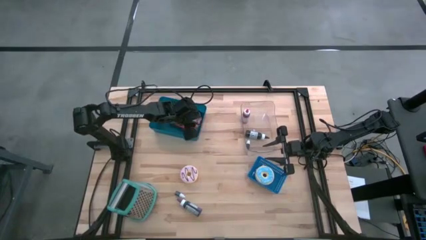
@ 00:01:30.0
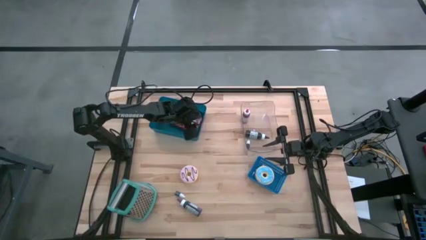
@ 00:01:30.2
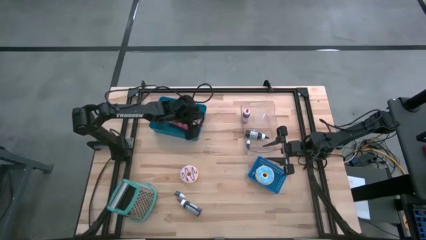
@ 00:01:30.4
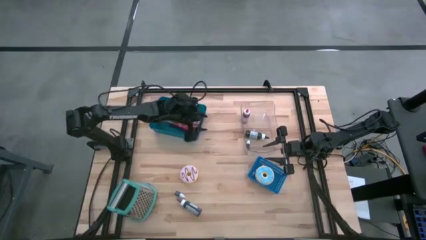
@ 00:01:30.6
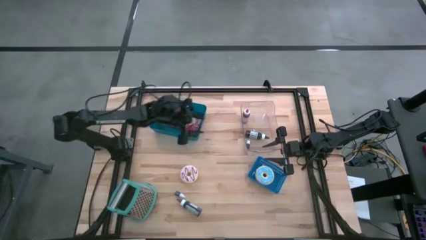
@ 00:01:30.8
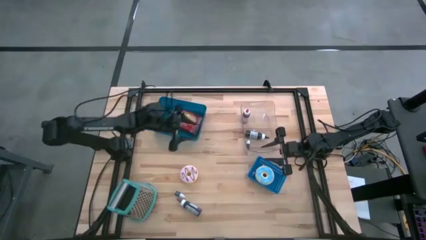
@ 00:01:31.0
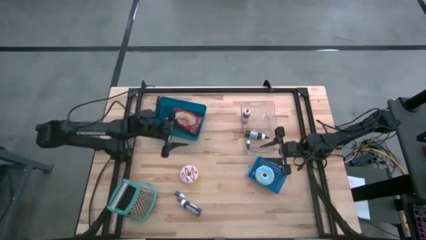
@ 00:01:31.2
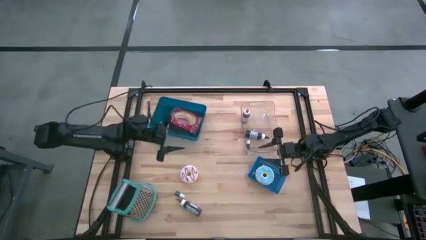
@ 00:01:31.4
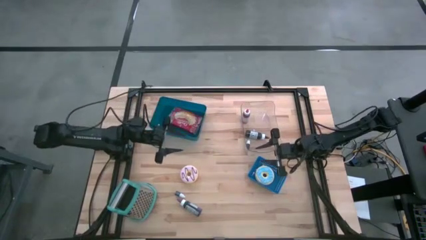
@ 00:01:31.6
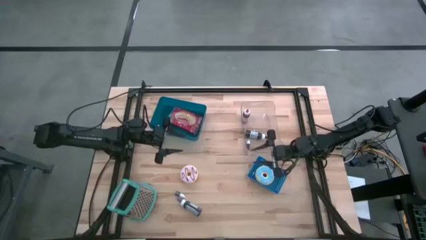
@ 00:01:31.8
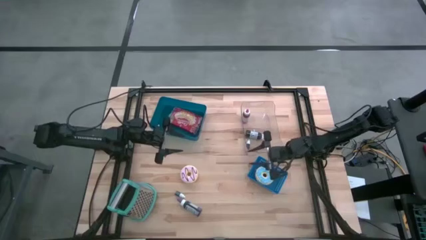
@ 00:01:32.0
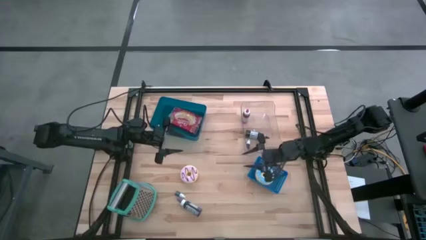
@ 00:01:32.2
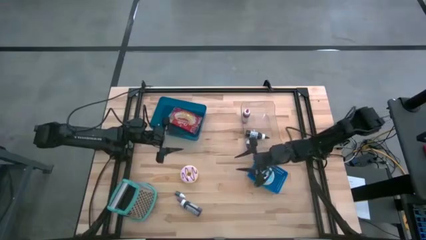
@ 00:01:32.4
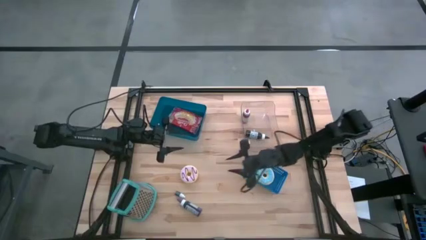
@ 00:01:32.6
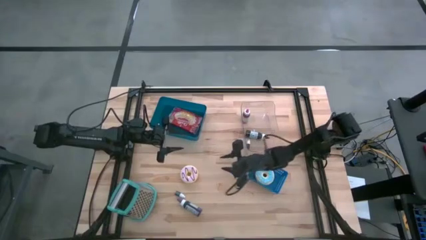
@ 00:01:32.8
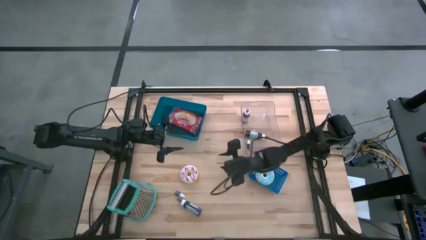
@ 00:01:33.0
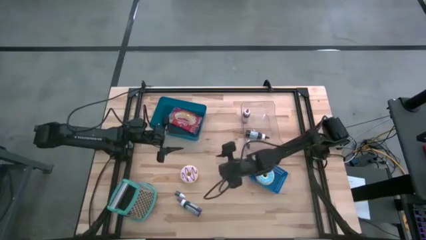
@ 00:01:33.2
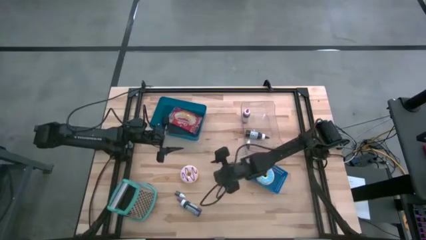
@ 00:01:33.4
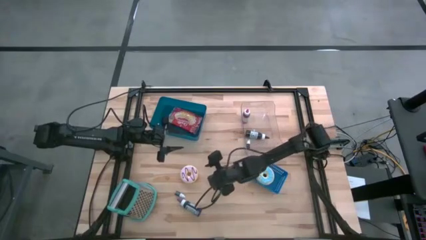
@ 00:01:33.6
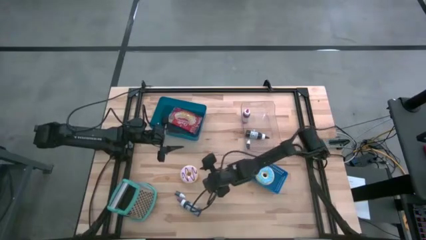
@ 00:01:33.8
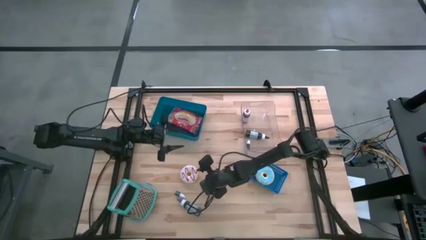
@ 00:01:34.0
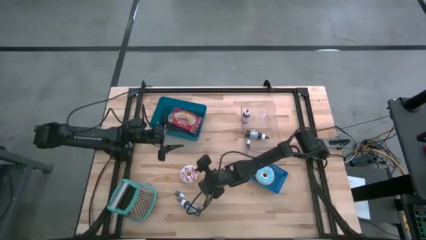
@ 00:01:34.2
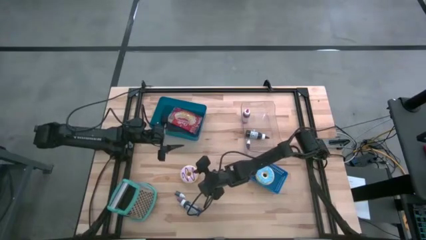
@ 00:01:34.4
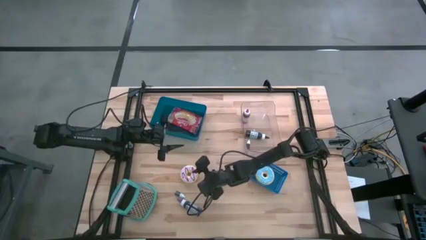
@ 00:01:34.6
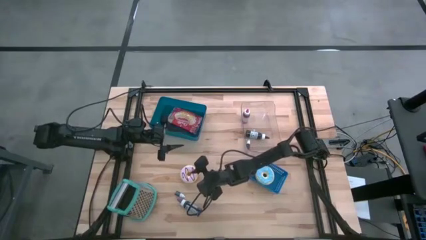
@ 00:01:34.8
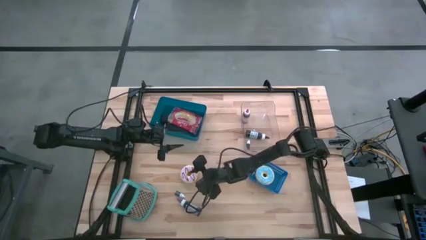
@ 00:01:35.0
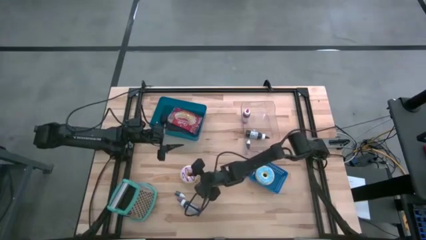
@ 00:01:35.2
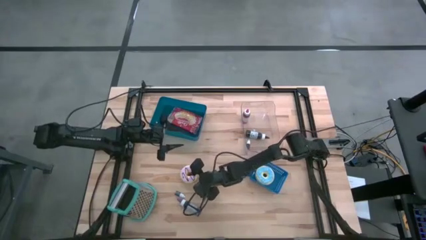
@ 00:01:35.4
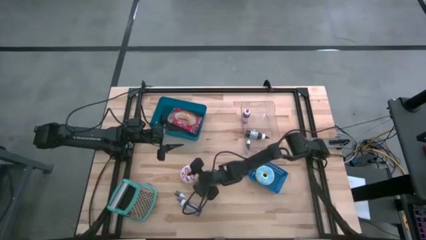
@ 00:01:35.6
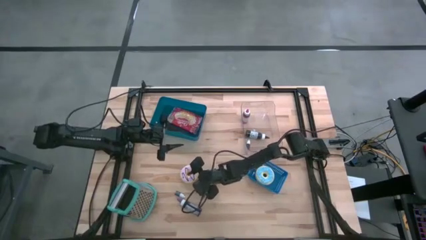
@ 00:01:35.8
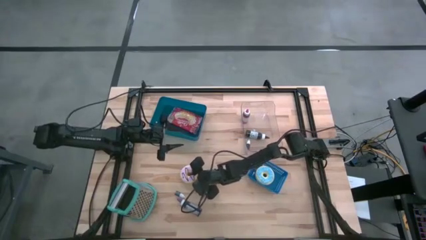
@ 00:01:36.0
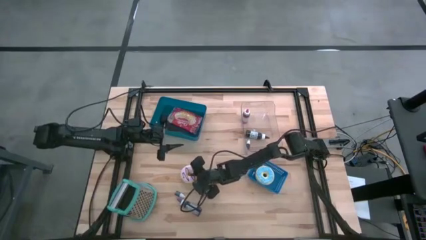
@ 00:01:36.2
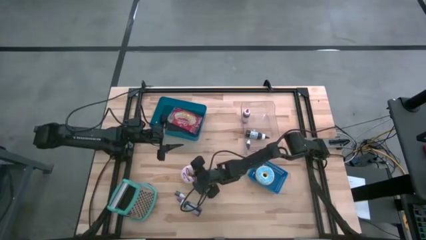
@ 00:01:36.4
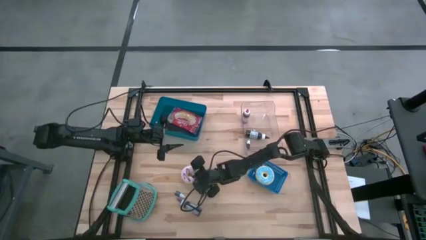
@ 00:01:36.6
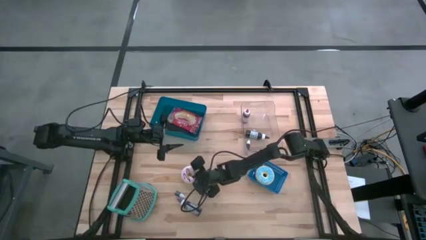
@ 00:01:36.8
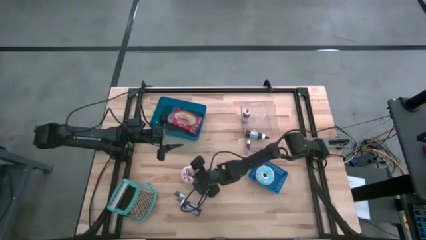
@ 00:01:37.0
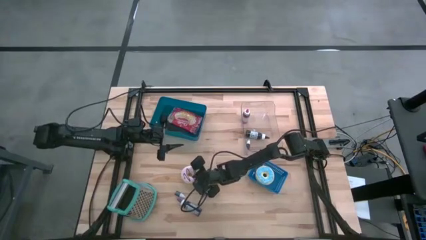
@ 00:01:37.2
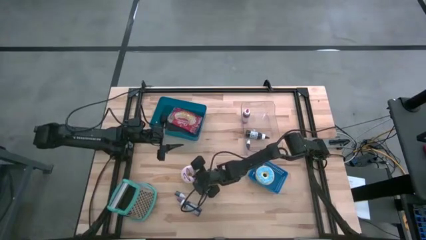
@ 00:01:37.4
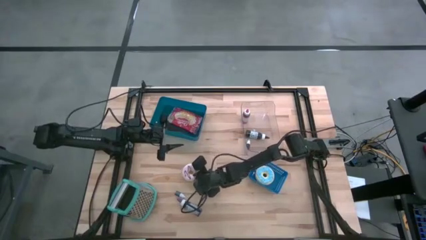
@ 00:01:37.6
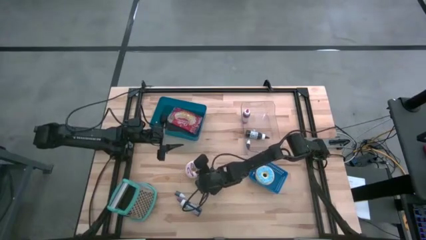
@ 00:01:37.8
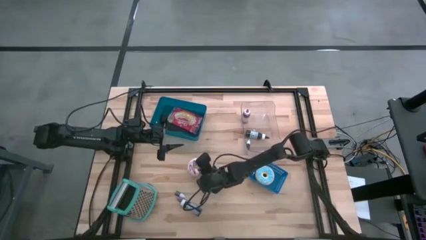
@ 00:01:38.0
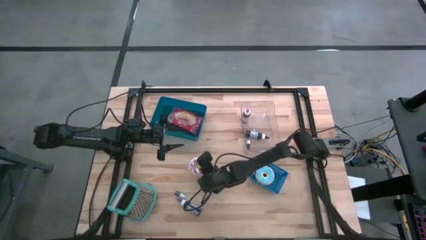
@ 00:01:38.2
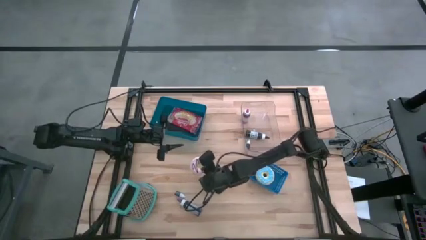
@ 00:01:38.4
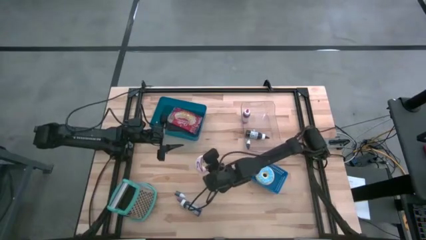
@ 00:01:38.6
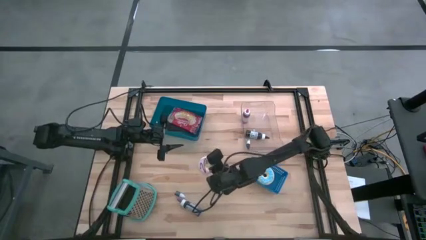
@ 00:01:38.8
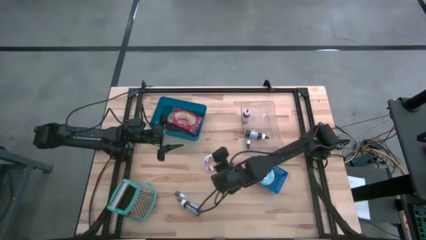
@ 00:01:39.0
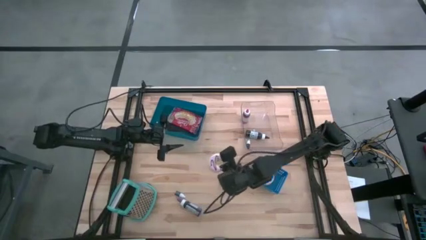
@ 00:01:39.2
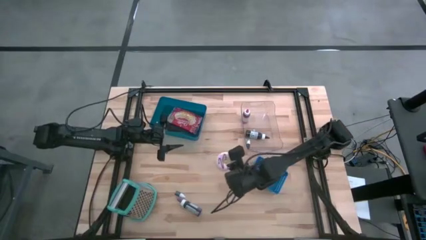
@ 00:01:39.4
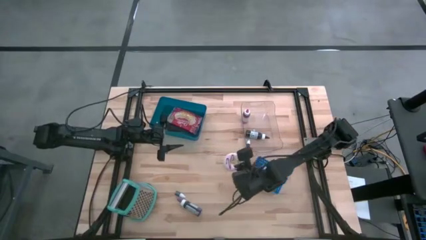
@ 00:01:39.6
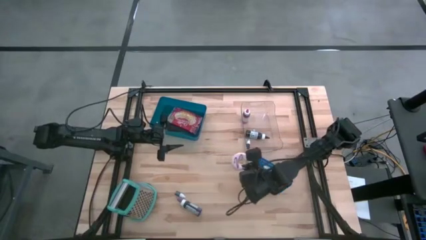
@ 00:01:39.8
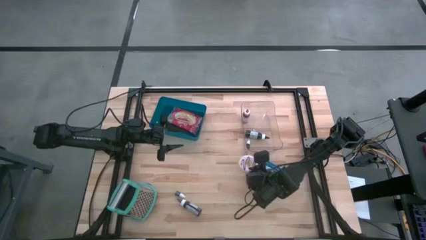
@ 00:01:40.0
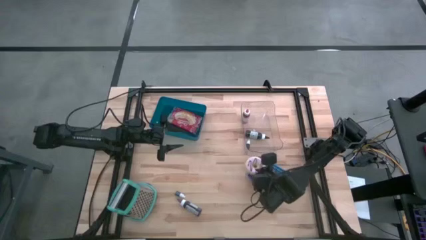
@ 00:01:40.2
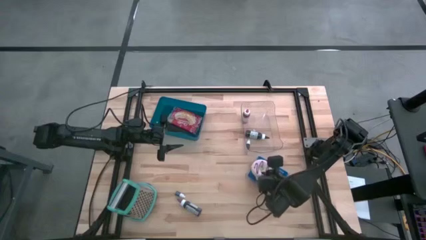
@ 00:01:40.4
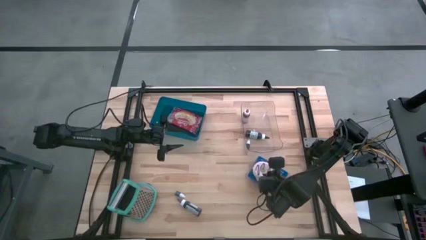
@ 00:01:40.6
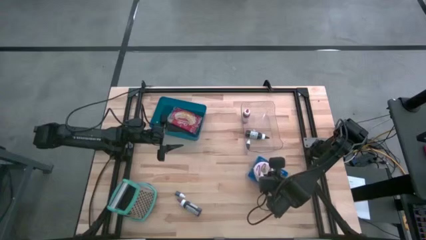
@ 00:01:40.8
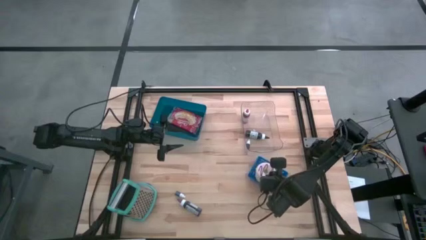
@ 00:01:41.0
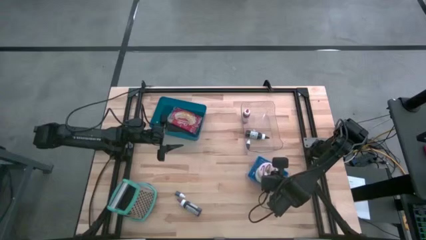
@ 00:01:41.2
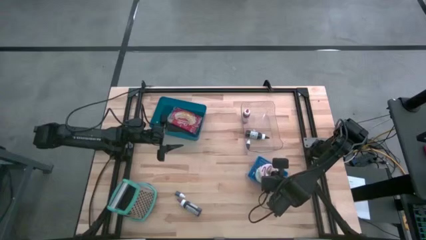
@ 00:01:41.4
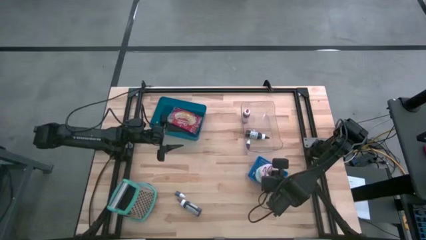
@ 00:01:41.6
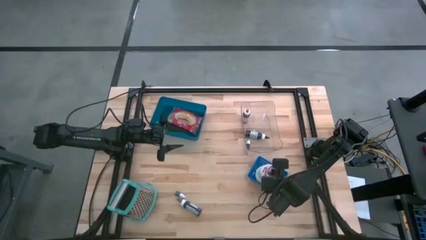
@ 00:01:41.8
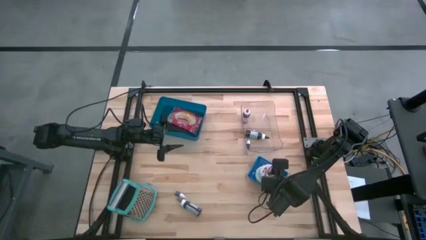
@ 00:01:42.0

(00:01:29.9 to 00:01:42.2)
Task: Pick & Place Food Item
Put the purple doughnut into the blue bin

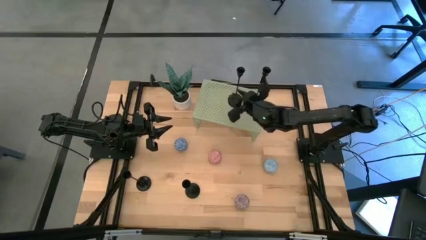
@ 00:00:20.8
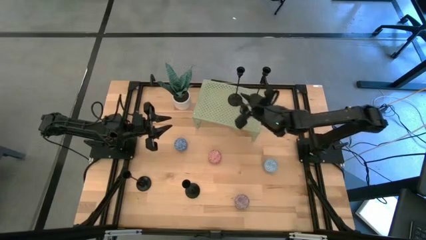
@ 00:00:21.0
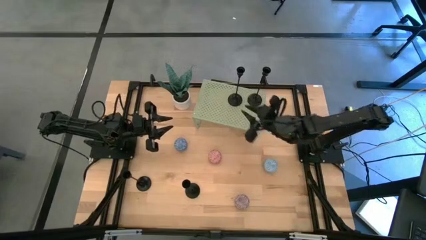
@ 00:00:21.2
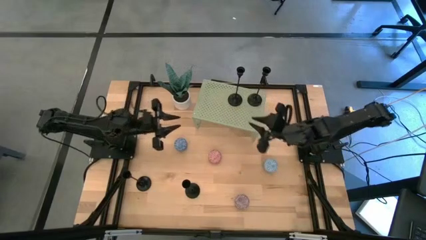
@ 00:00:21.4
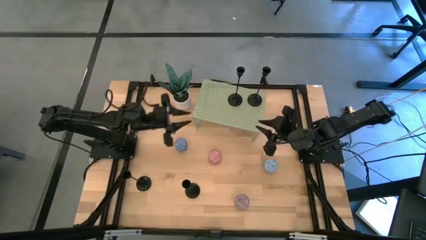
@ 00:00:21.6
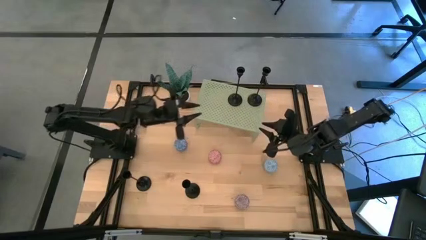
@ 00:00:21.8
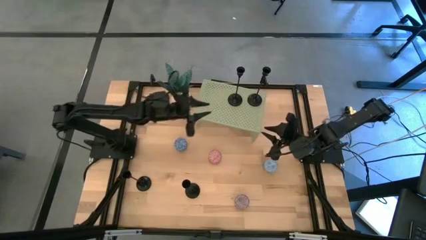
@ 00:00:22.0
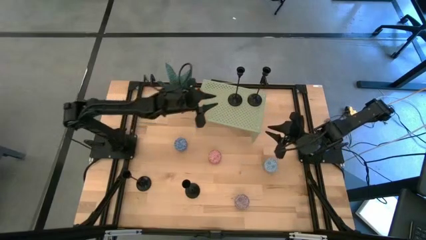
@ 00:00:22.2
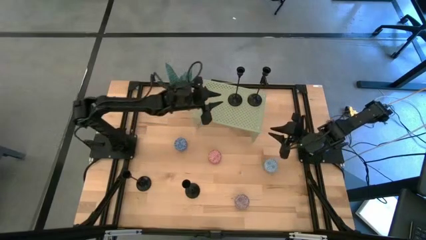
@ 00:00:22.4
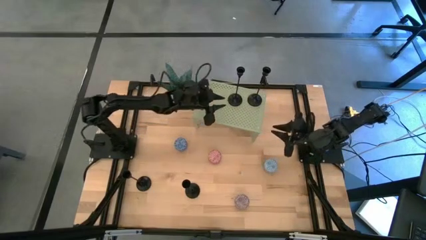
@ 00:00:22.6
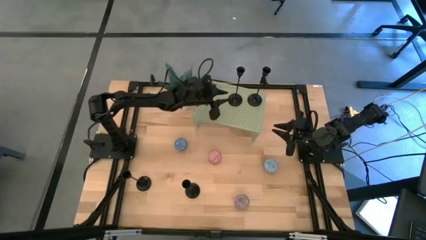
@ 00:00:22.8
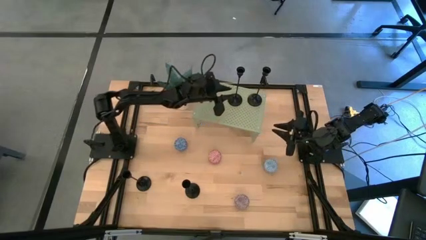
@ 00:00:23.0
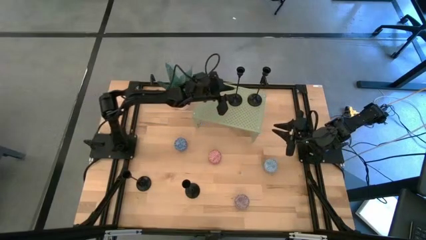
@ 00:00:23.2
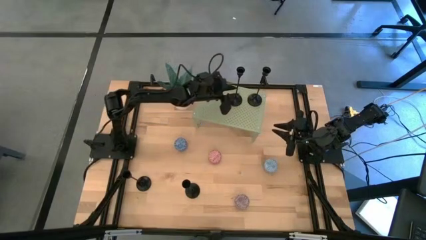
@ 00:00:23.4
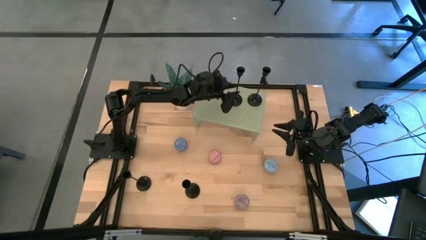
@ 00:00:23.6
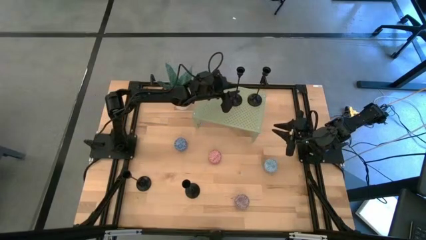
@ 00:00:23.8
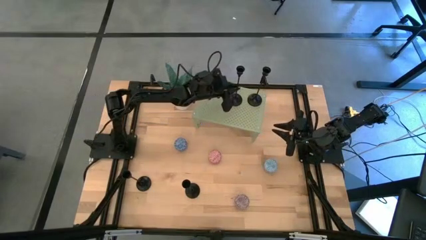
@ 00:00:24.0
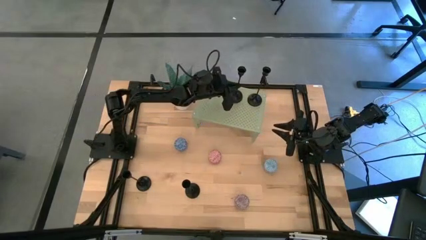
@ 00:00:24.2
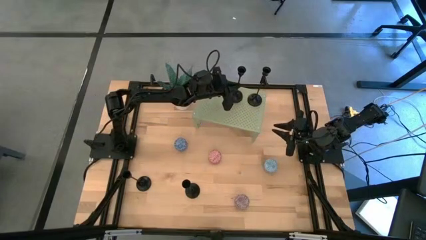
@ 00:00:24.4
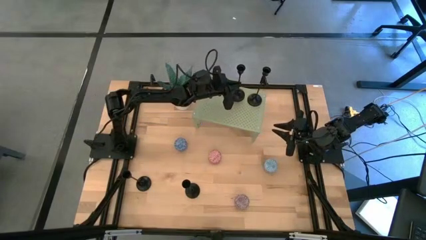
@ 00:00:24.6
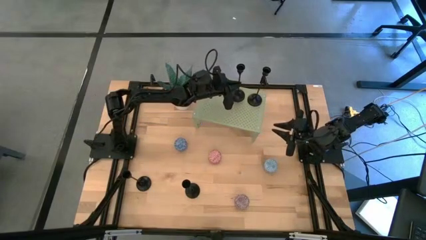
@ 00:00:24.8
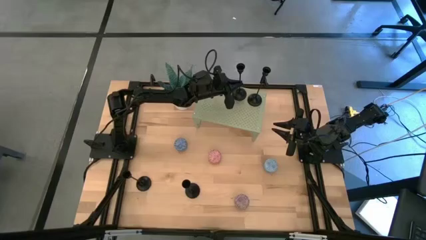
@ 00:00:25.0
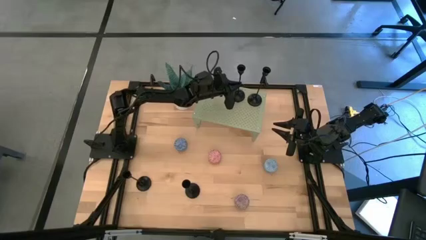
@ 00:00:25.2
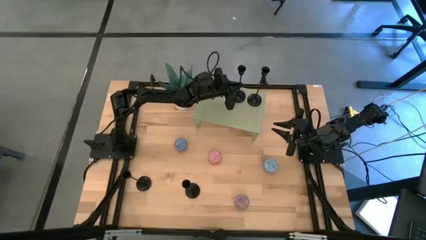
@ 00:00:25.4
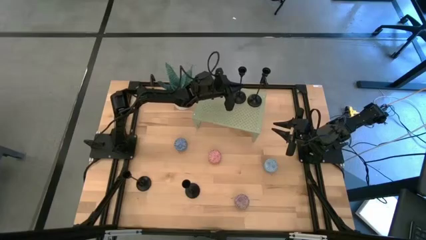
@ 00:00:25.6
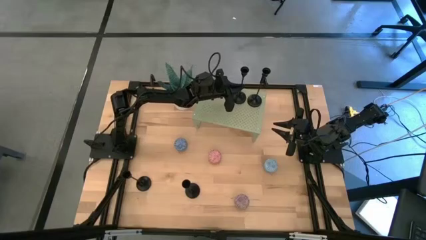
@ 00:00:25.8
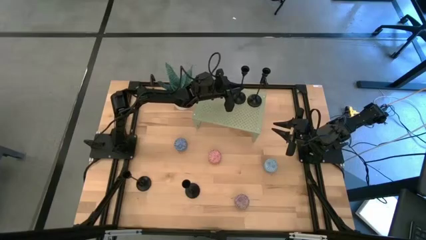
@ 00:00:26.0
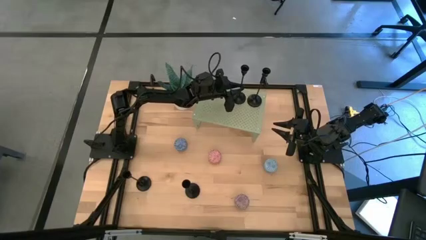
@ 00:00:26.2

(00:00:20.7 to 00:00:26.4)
Task: Pick & Place candle stick holders
Adjust the black candle holder on the shelf
